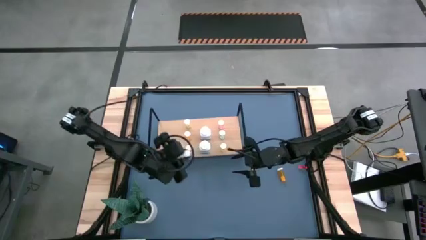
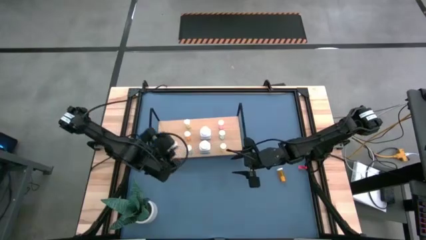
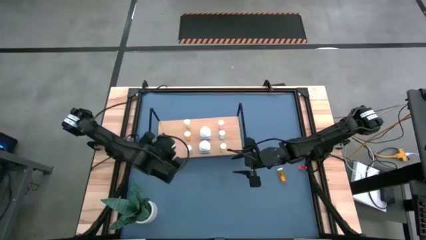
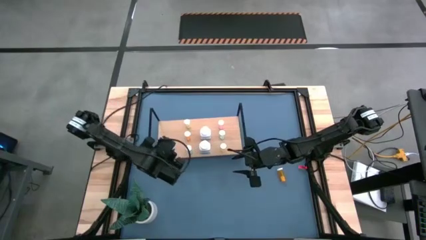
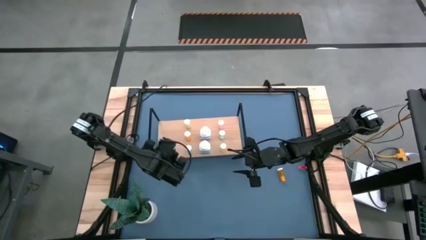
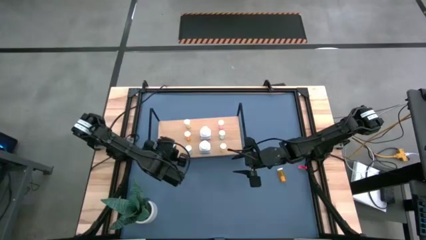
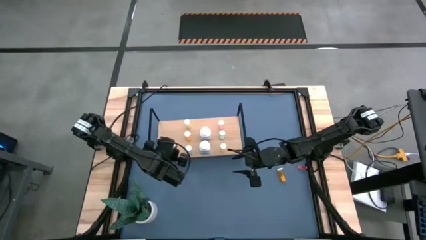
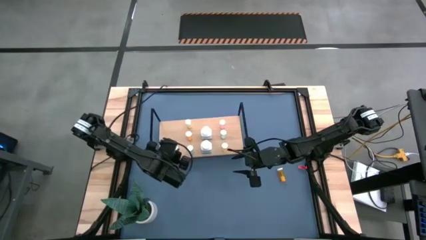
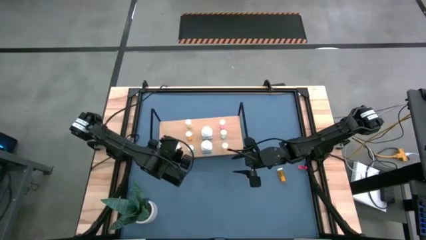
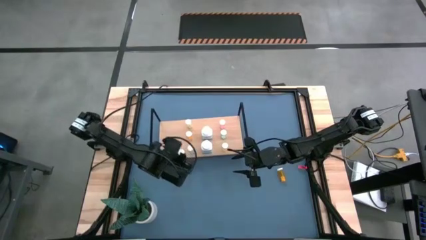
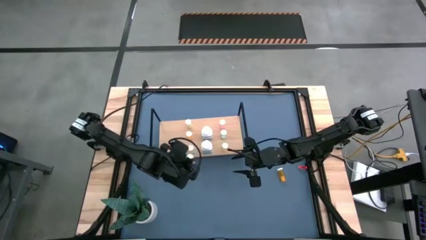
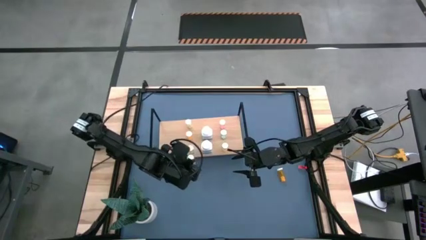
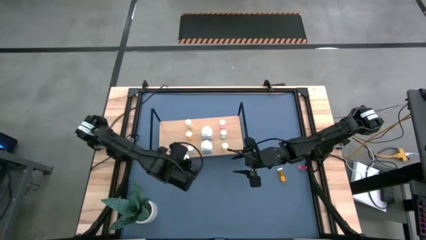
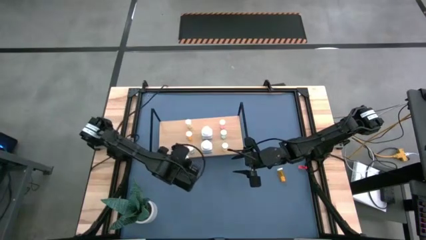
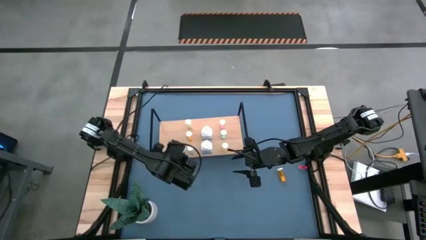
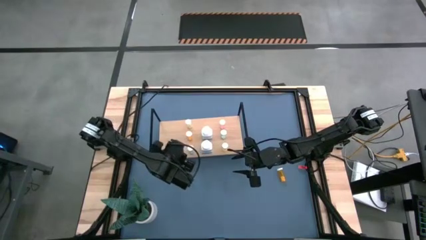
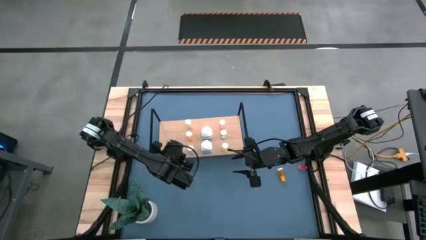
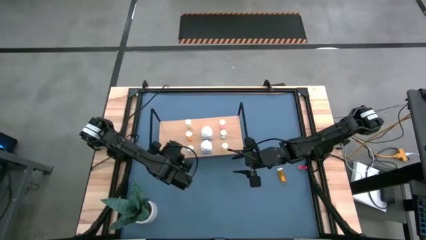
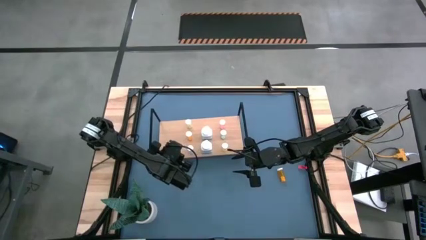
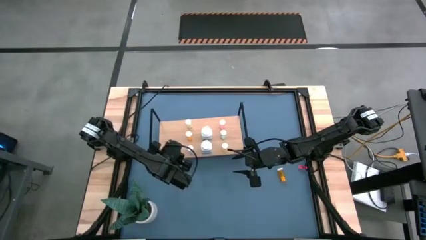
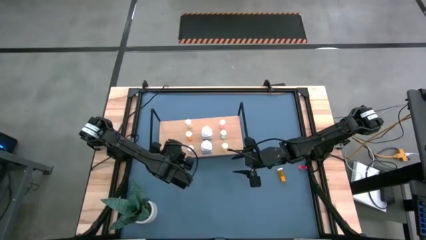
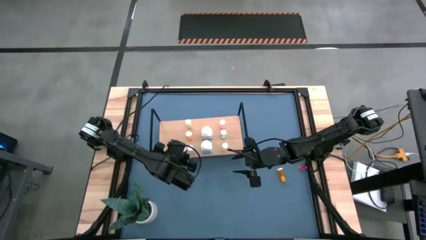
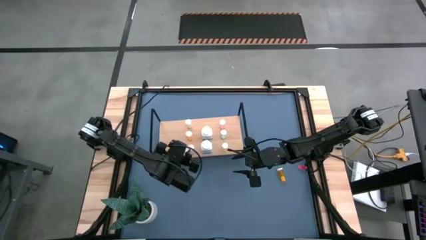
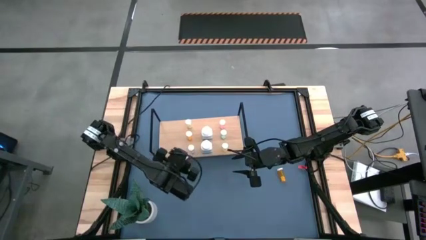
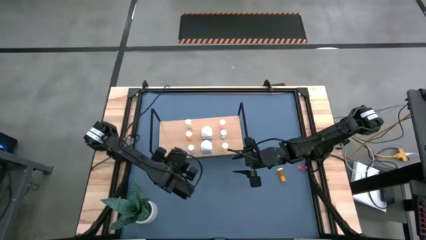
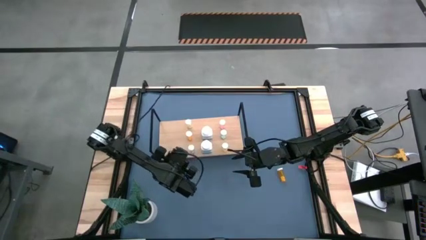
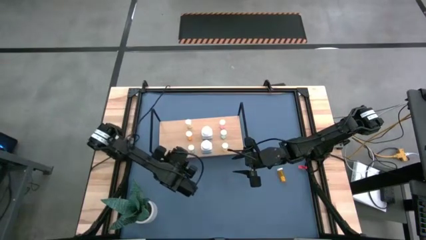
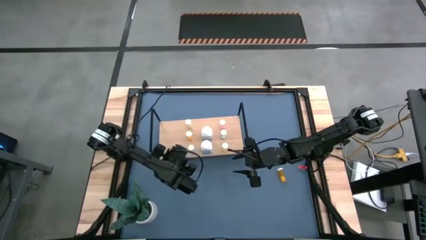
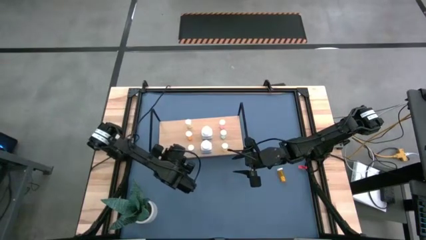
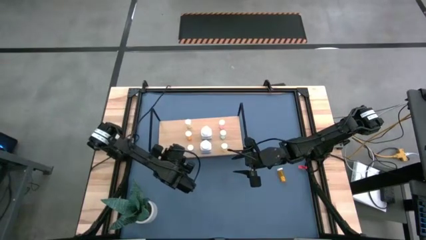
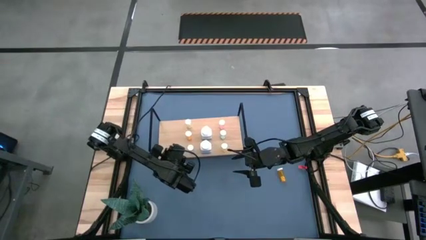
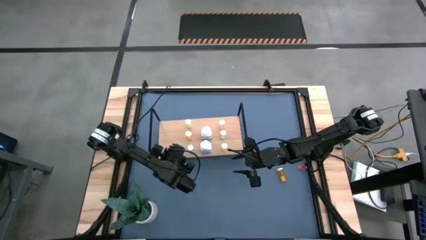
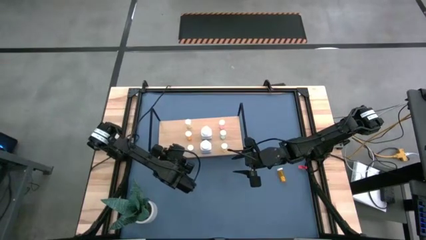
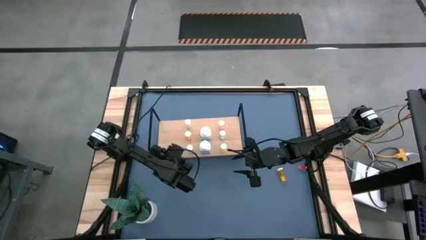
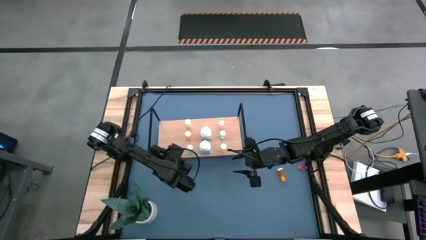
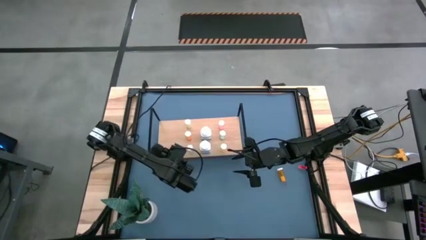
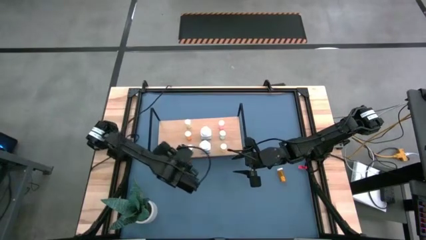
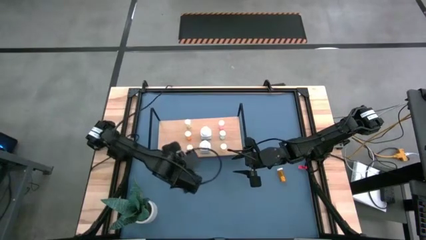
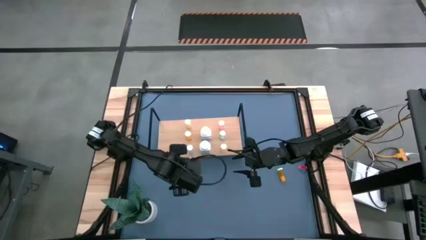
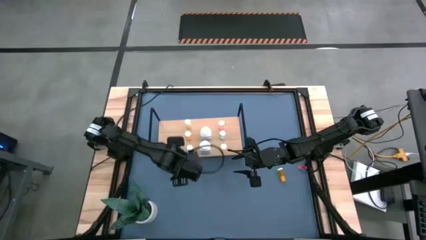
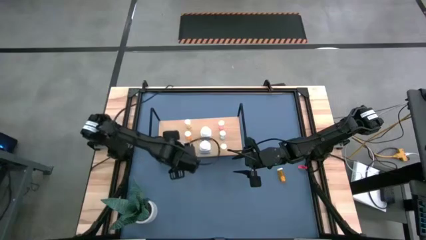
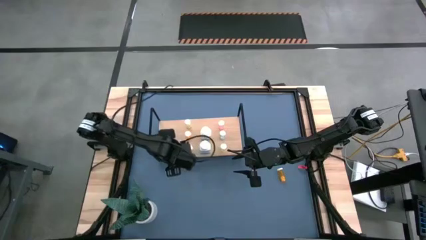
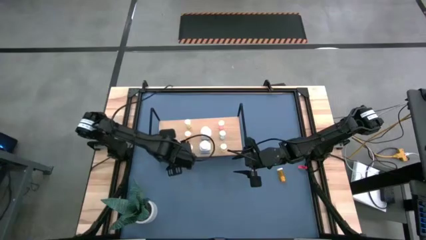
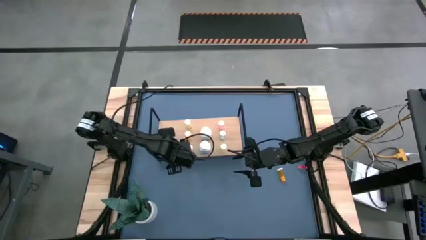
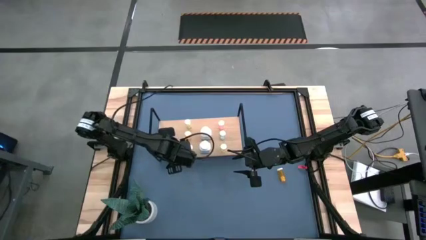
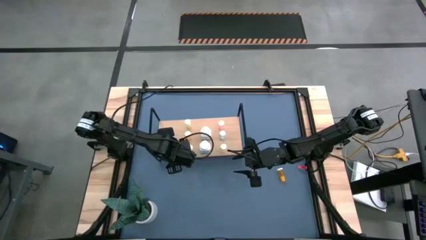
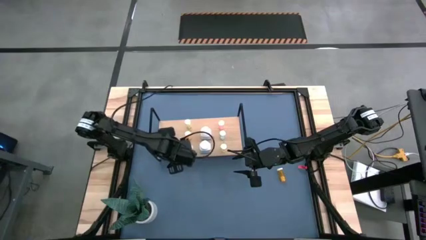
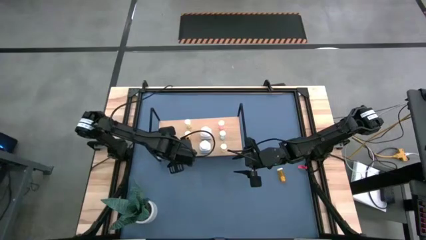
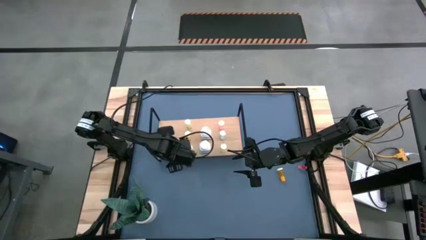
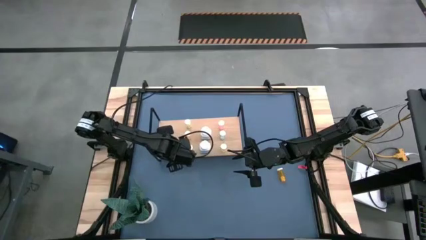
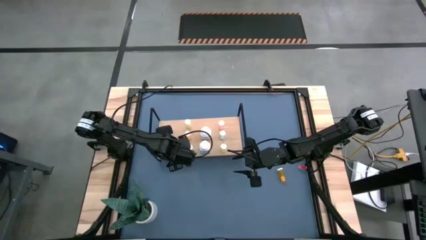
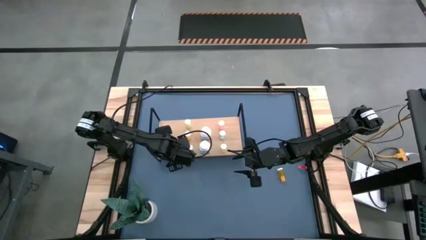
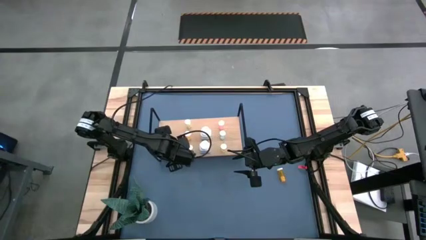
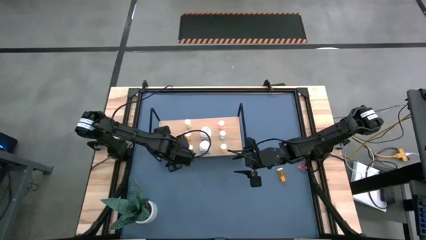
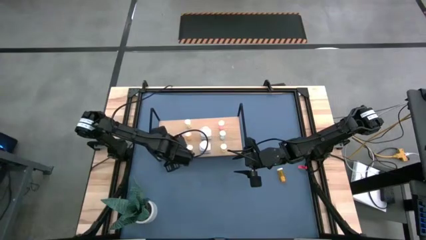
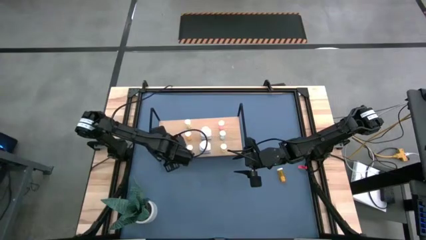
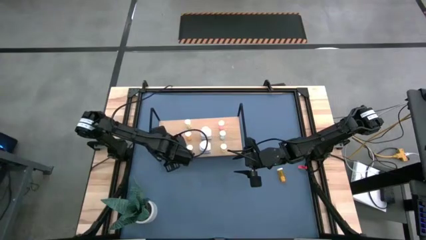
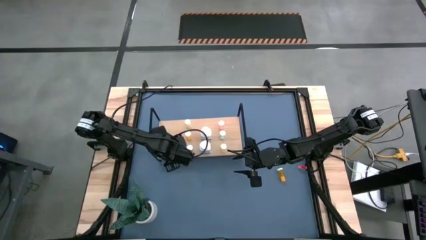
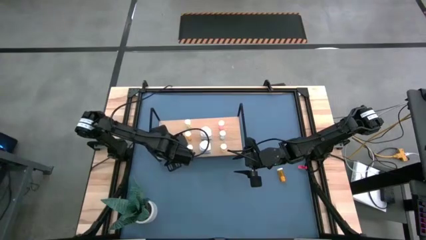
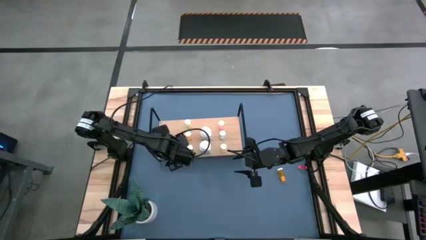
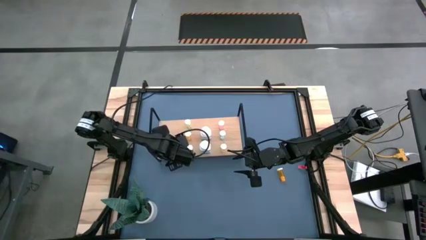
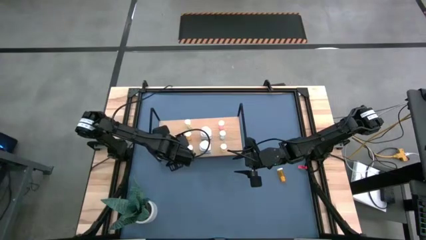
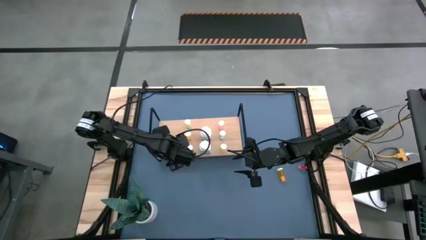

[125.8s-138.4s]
Task: Pick and place medicine bottles onto shelf by color
Put the pink pill bottle on the shelf

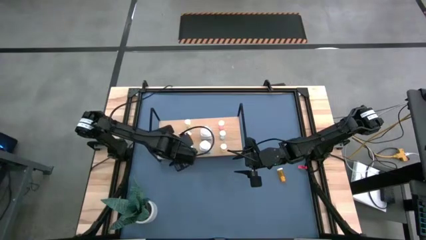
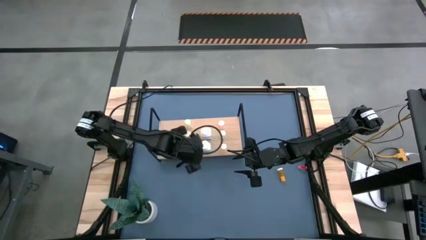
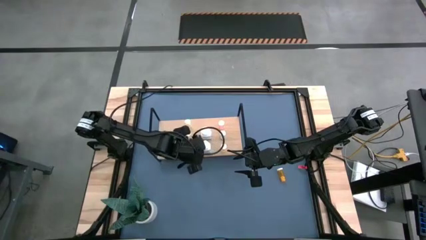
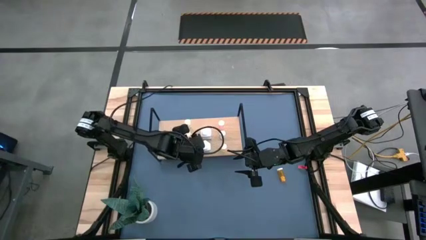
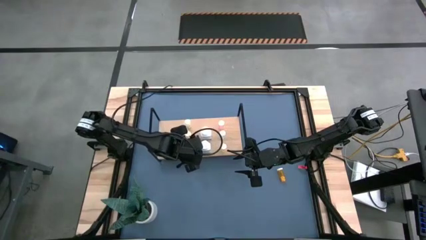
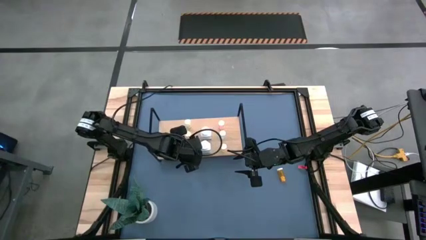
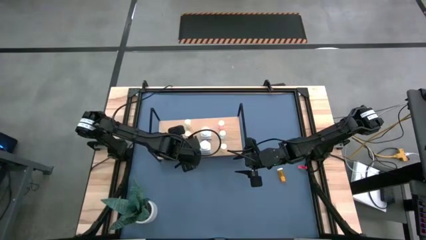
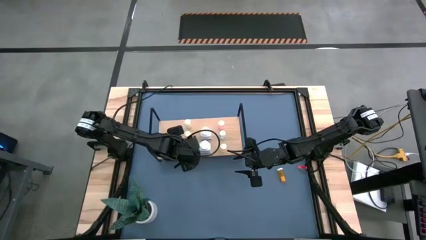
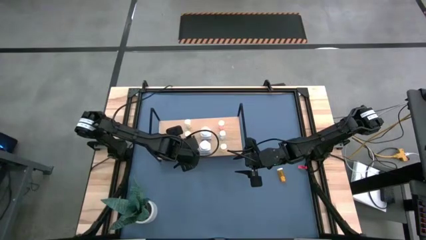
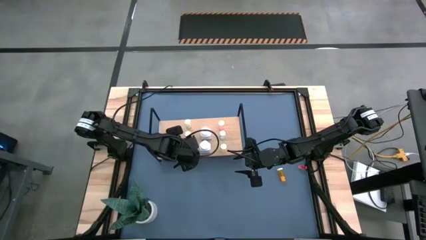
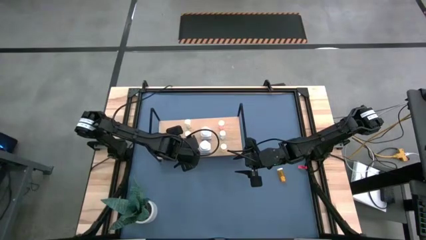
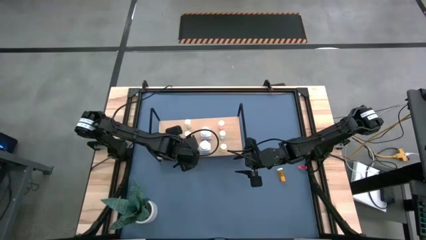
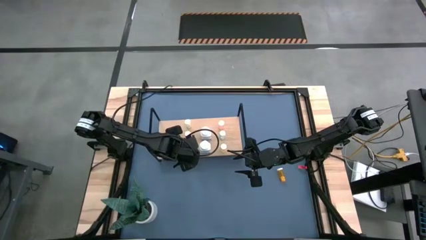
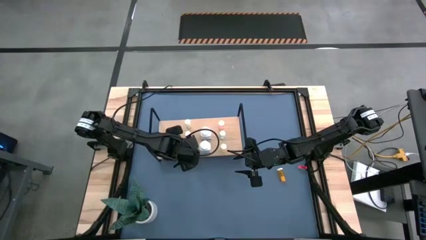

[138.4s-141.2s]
Adjust the blue pill bottle on the shelf

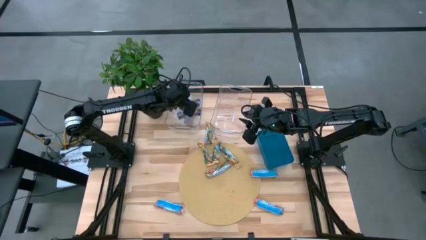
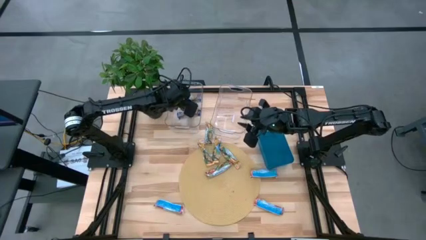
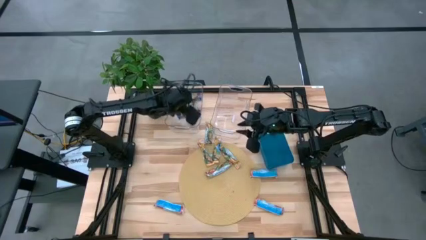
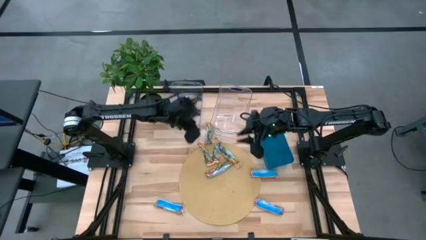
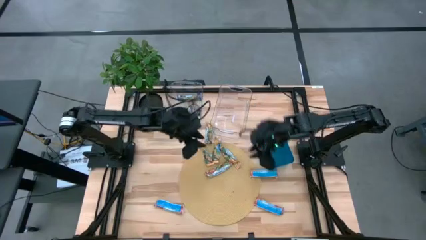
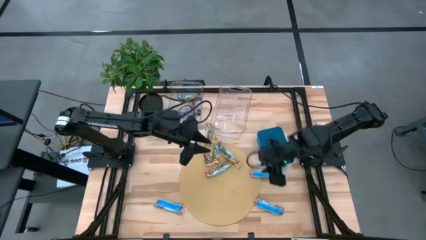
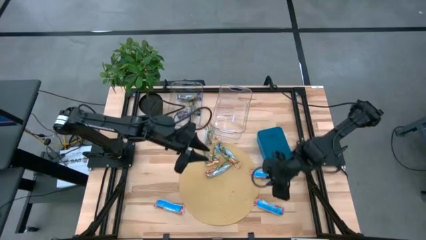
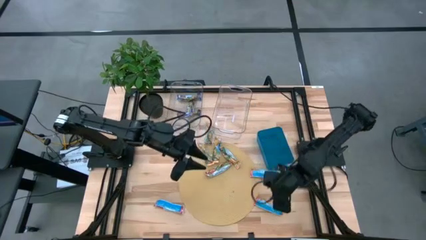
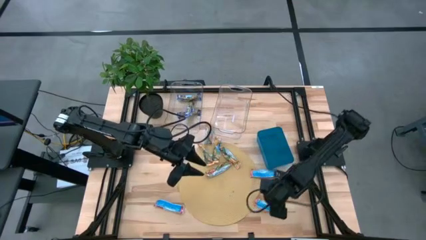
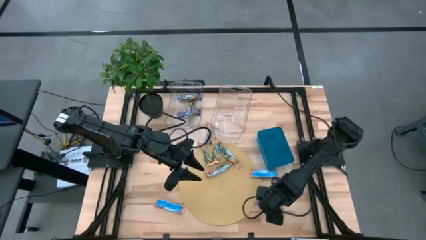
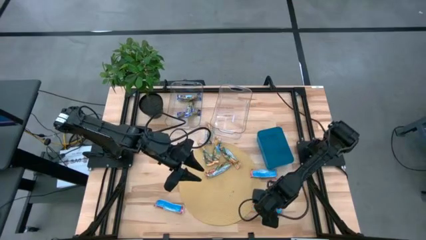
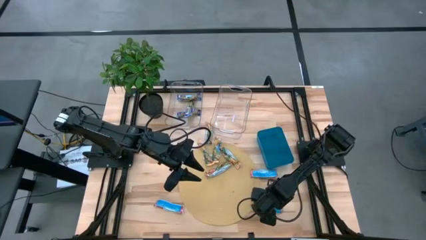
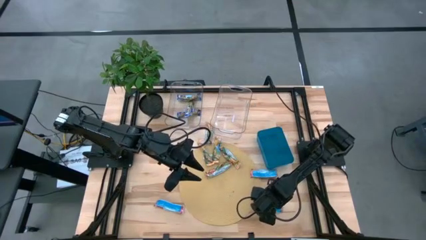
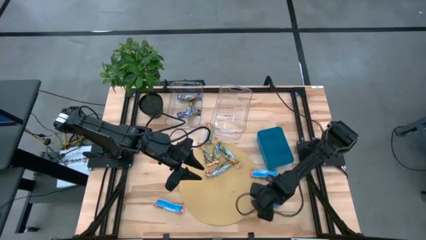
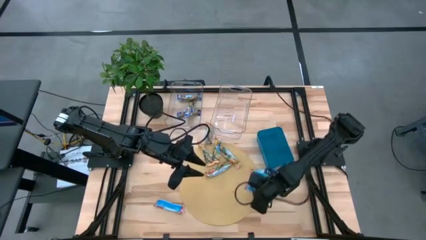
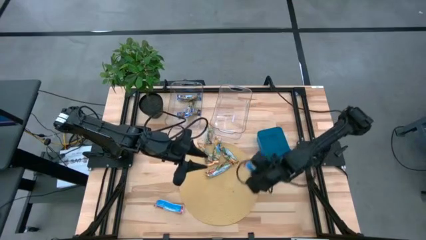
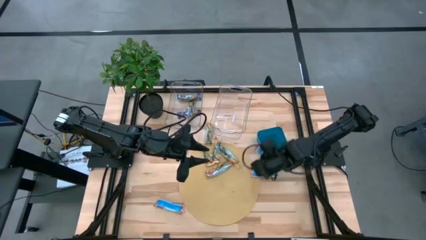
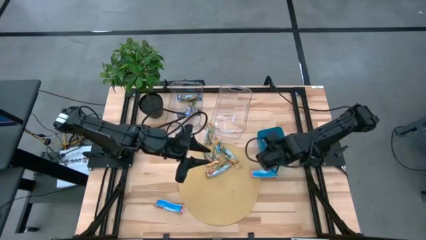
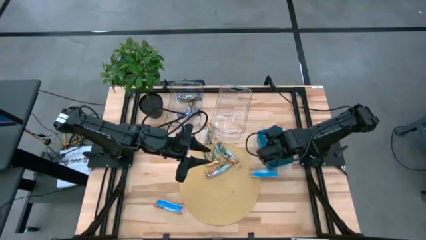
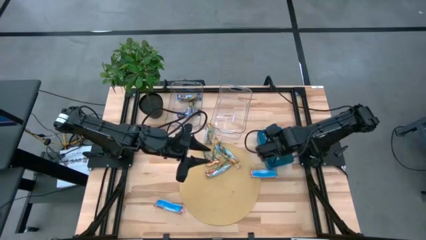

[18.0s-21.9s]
Task: Pick and place Granola Bars by type
Put the red granola bar into the blue transparent bin
